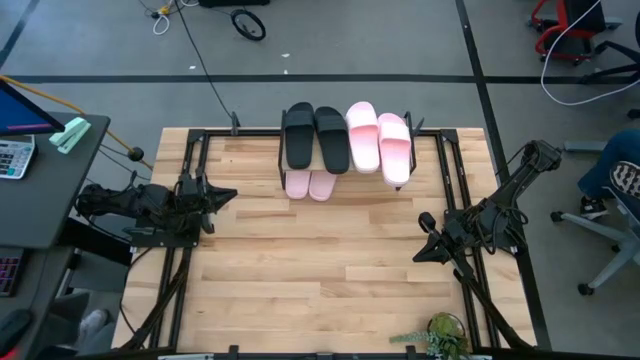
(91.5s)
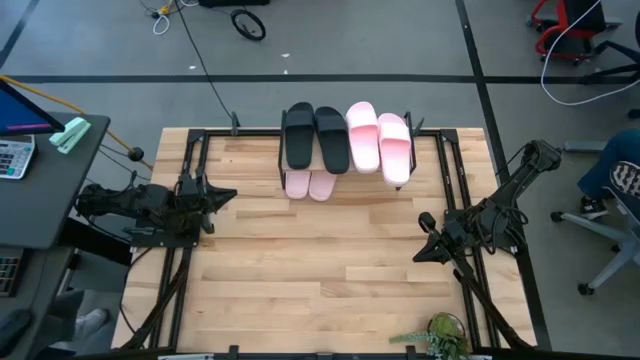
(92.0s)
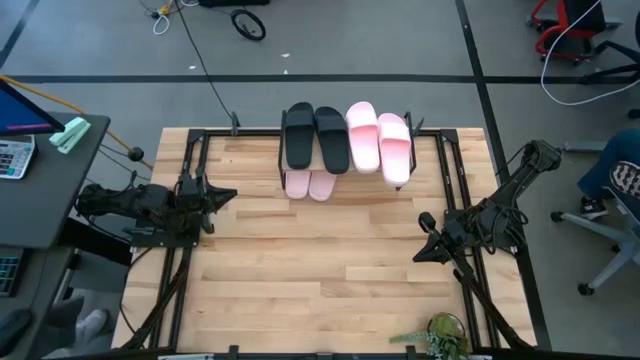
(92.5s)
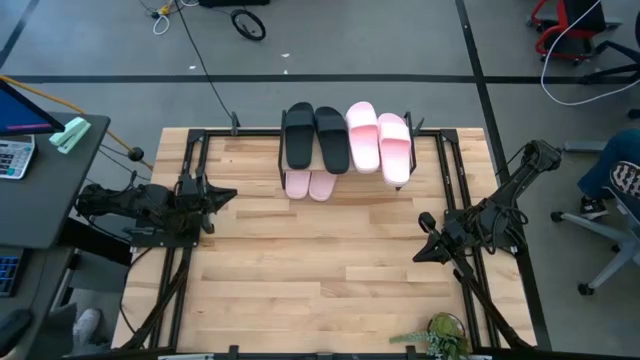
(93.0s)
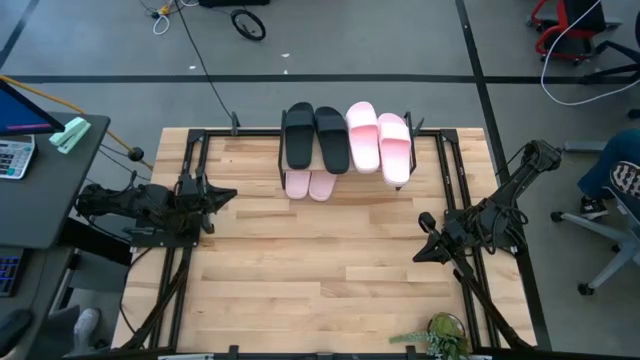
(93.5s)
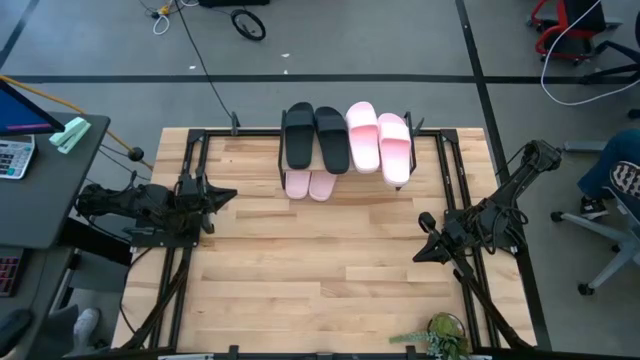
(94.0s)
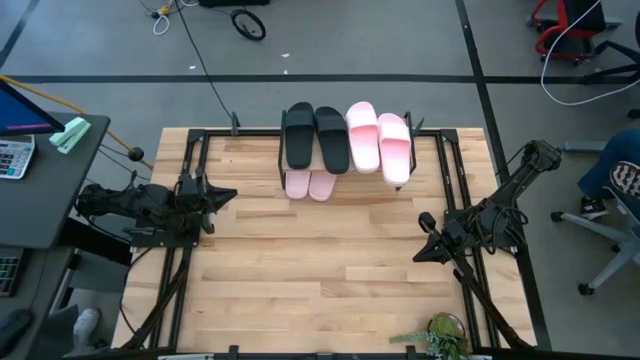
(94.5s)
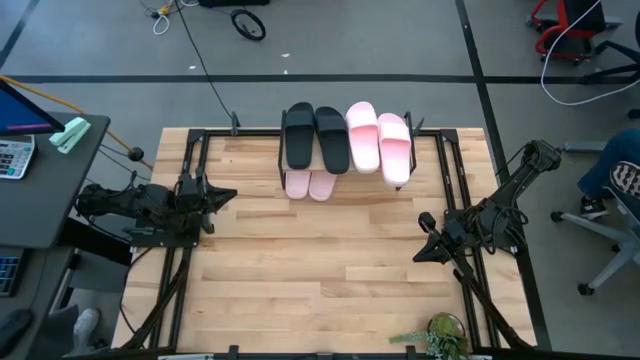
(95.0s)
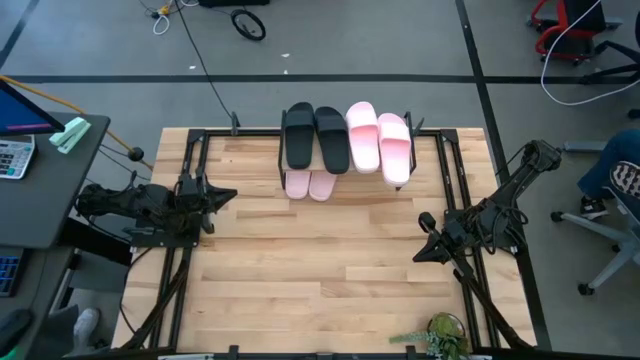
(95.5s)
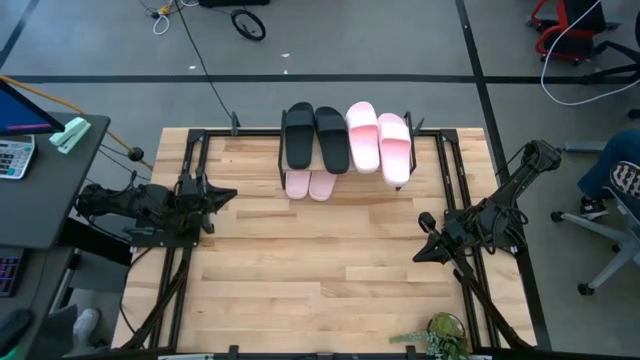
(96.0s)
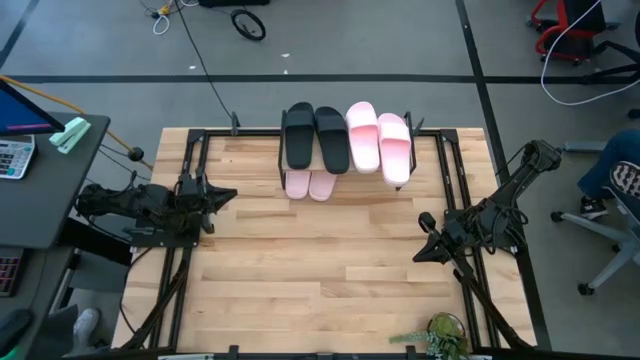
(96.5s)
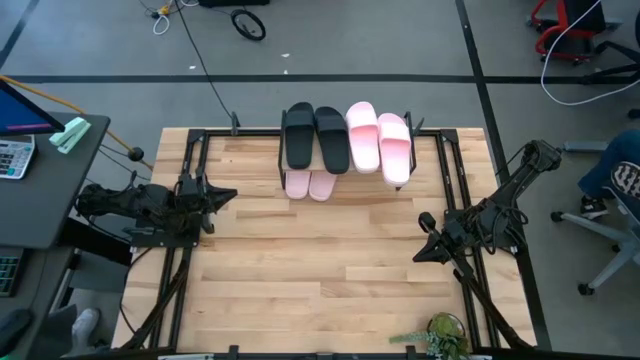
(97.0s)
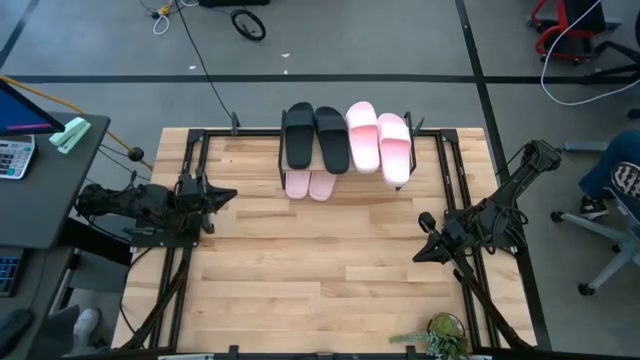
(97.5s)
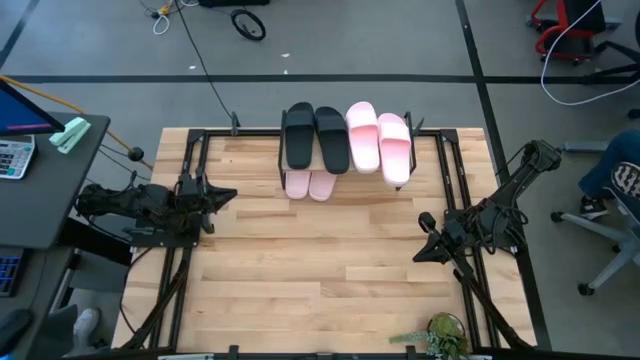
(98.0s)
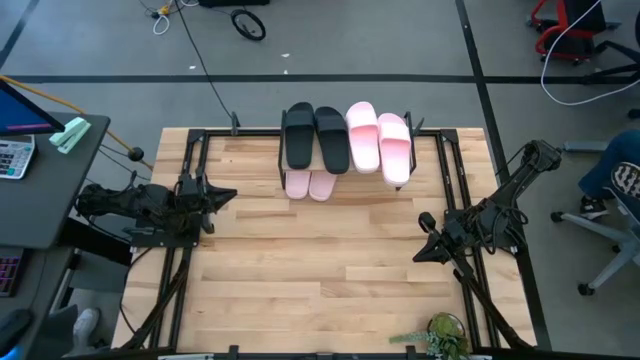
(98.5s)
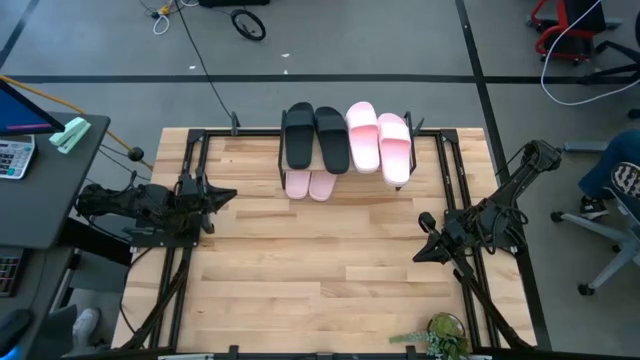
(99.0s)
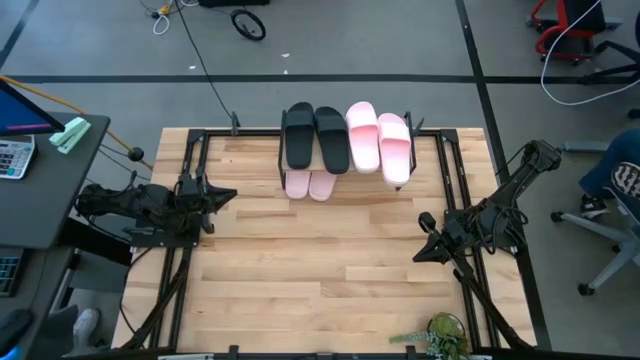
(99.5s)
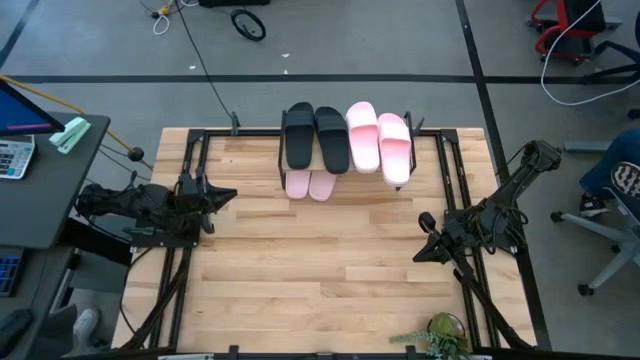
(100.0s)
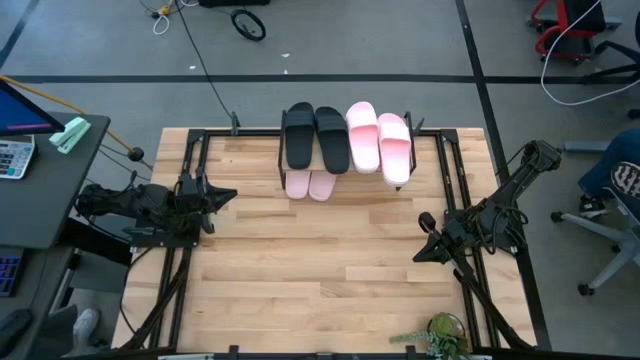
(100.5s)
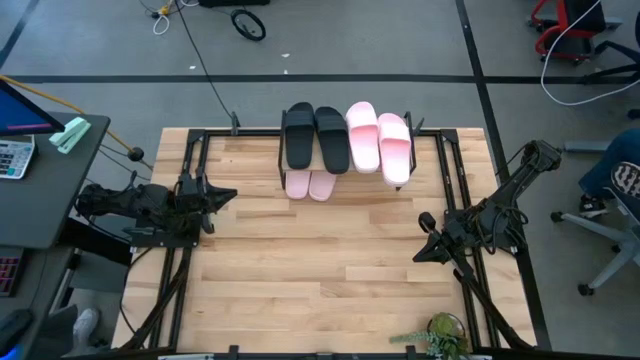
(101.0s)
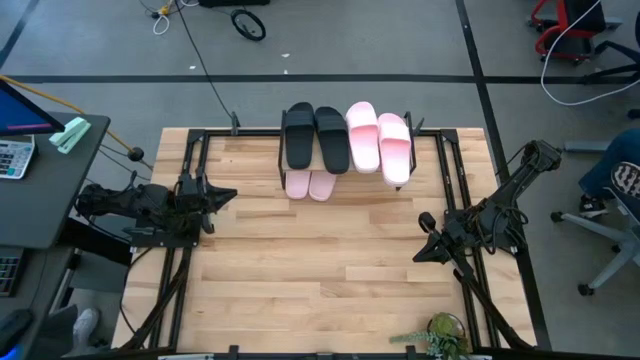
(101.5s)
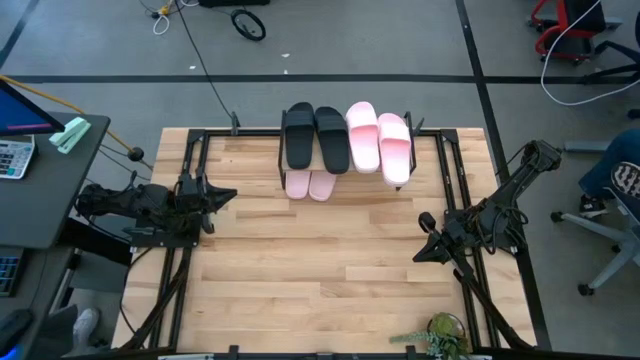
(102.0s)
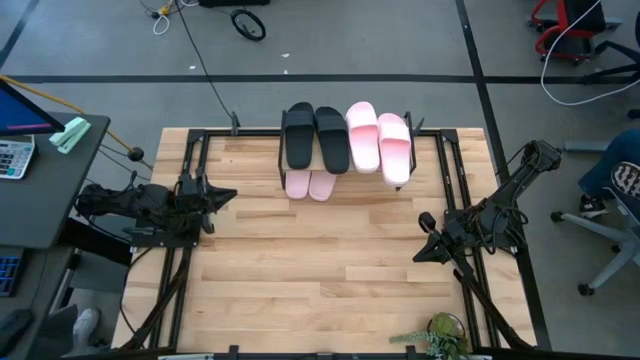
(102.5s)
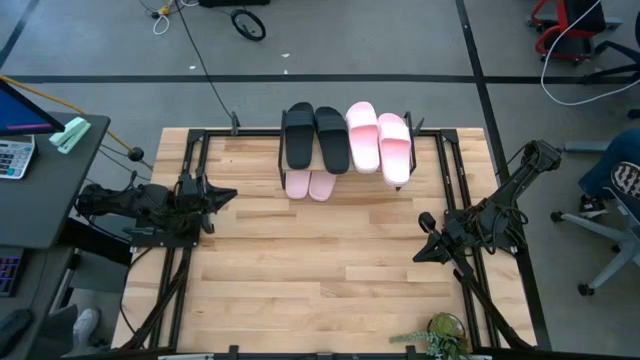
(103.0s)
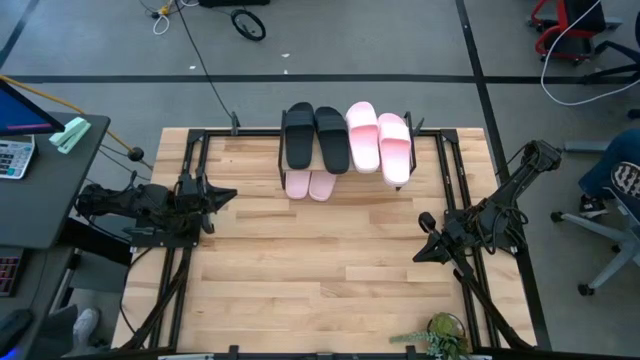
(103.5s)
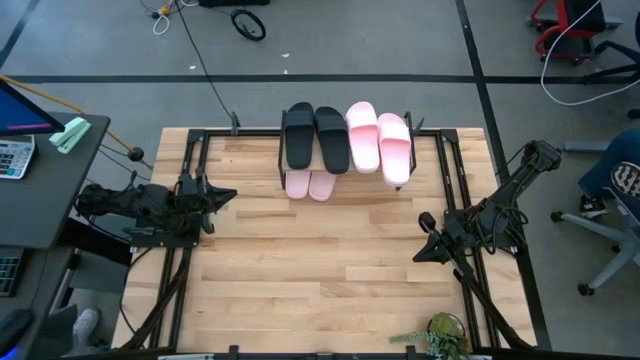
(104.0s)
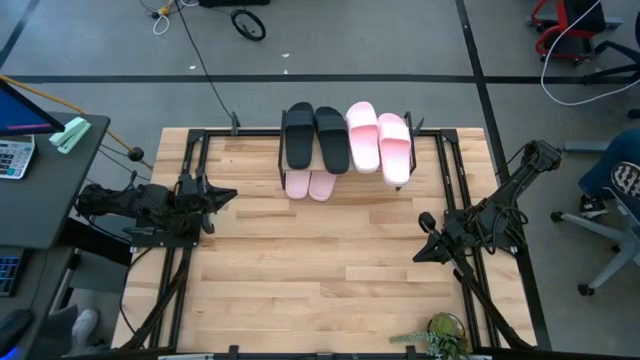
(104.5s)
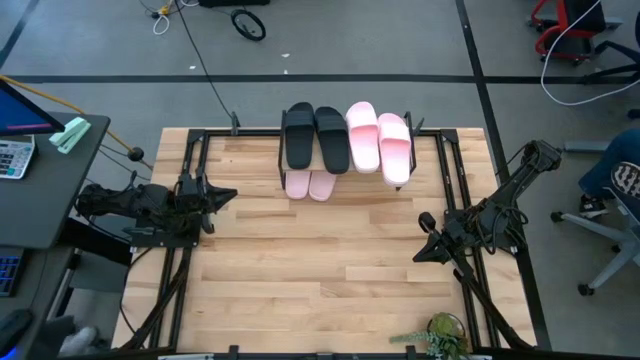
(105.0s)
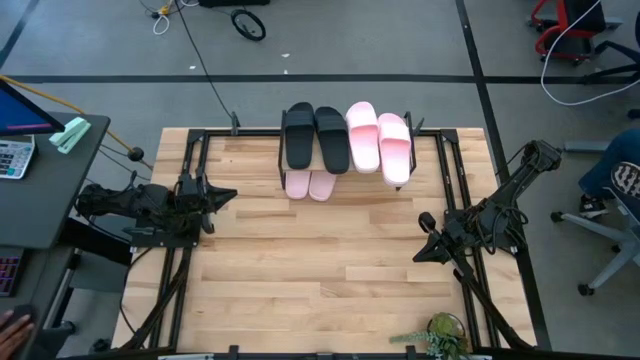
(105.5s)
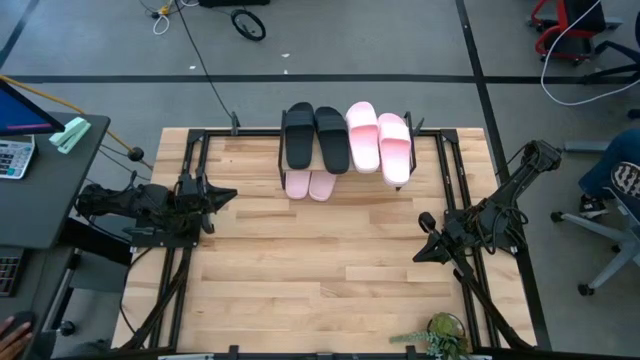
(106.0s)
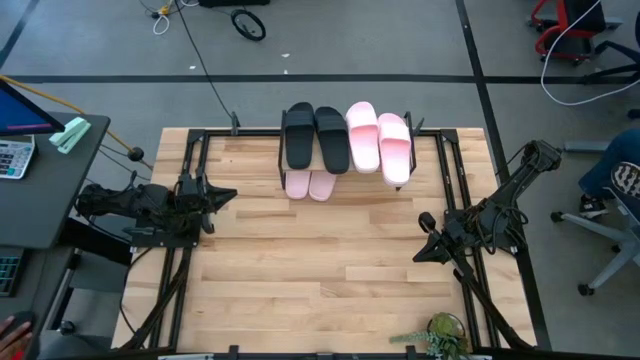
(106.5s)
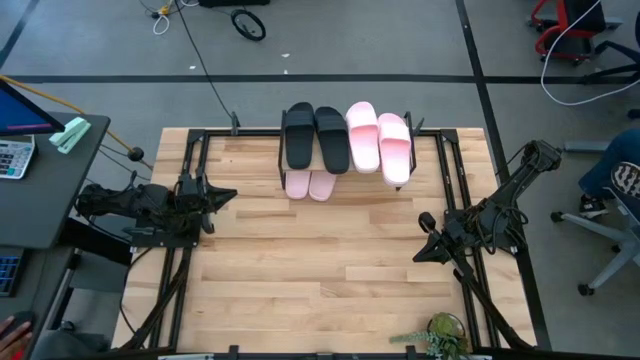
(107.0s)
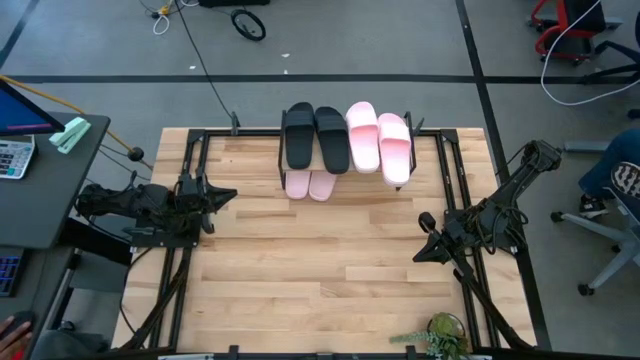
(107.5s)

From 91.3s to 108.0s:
Task: Pick and place slides into the shelf
Return to Home Position

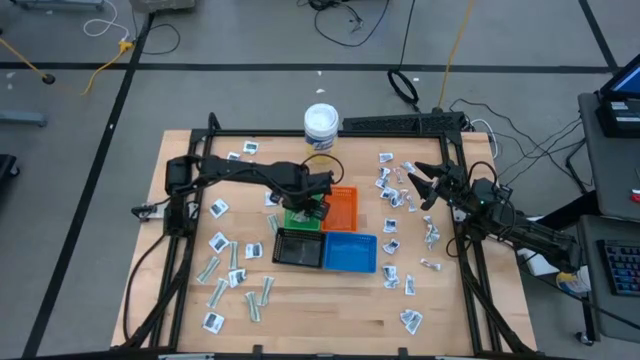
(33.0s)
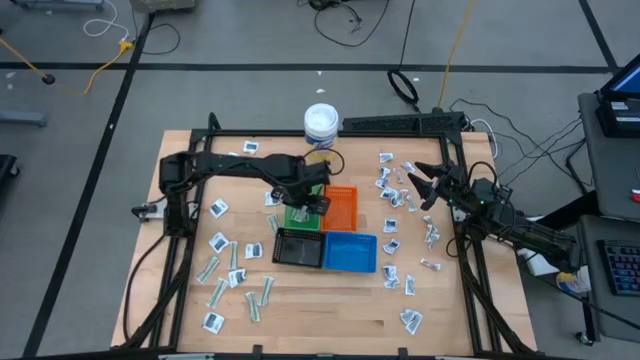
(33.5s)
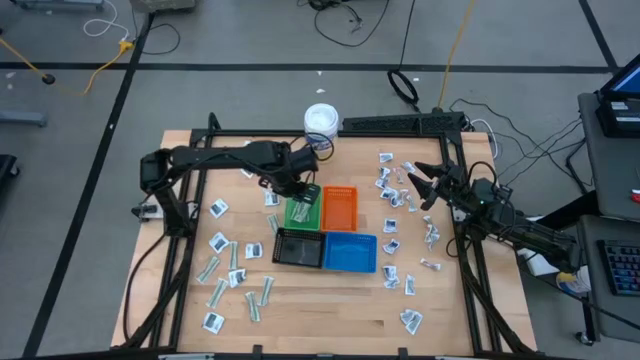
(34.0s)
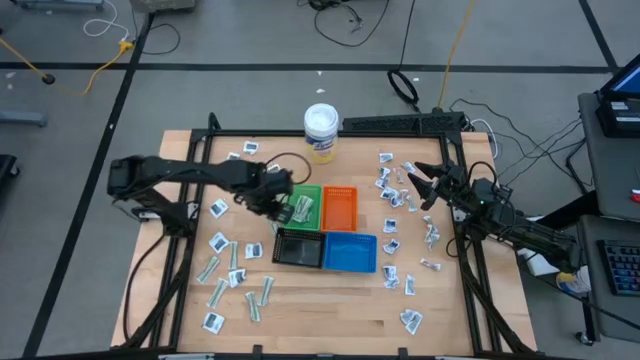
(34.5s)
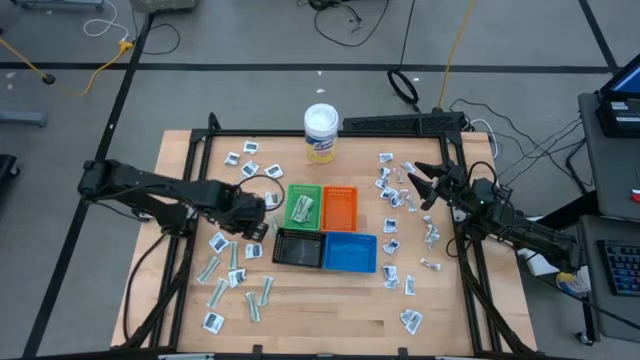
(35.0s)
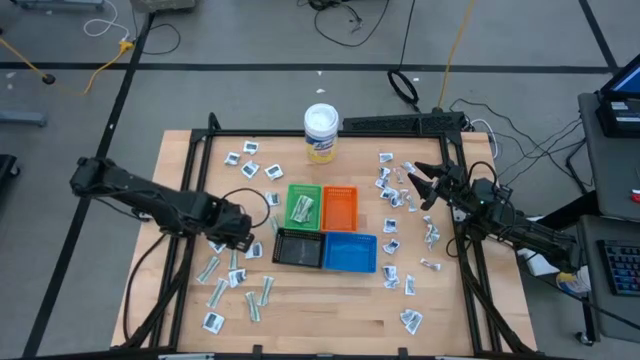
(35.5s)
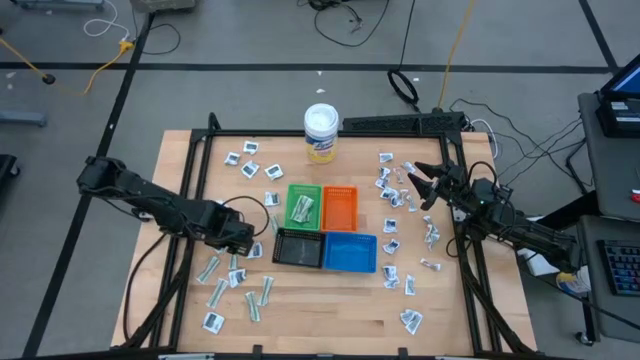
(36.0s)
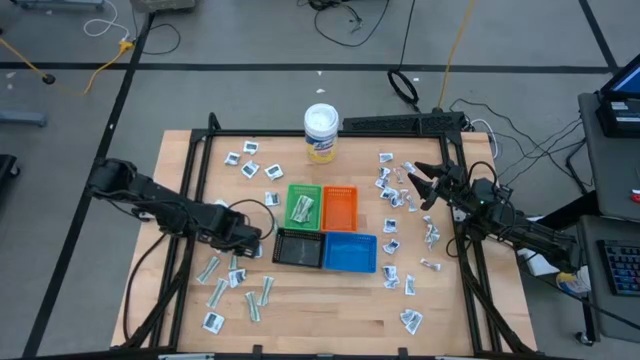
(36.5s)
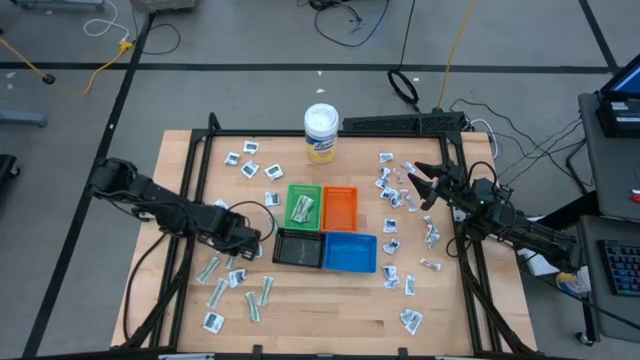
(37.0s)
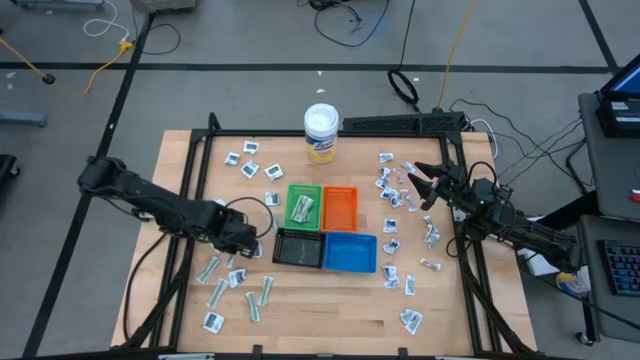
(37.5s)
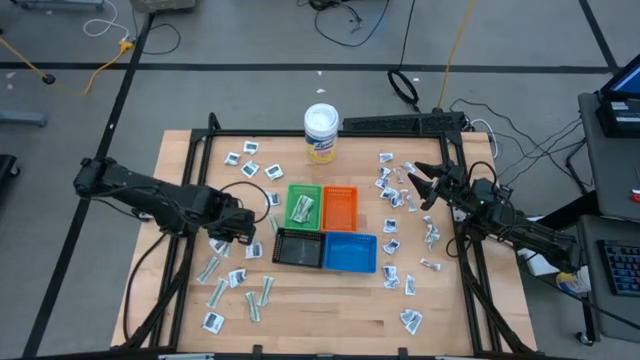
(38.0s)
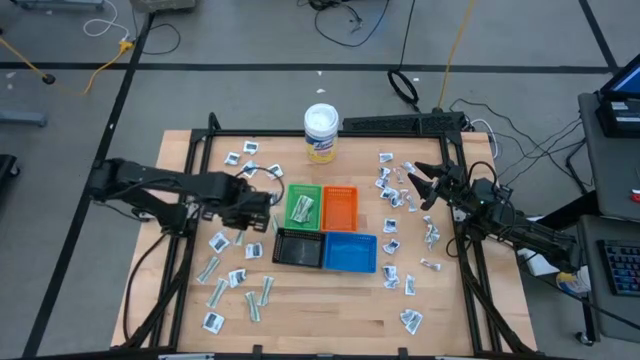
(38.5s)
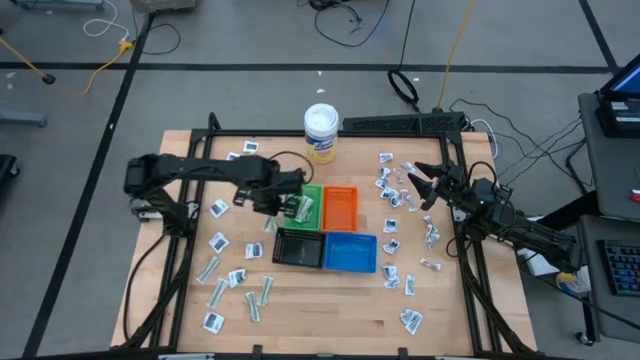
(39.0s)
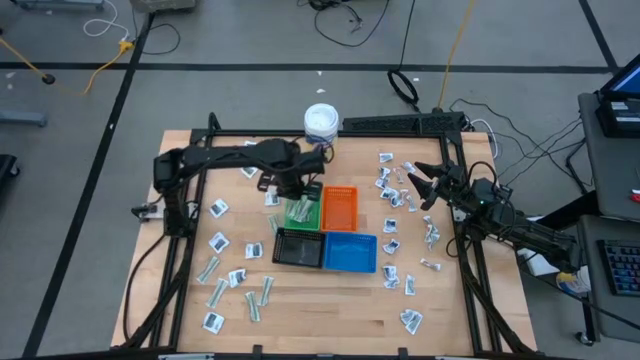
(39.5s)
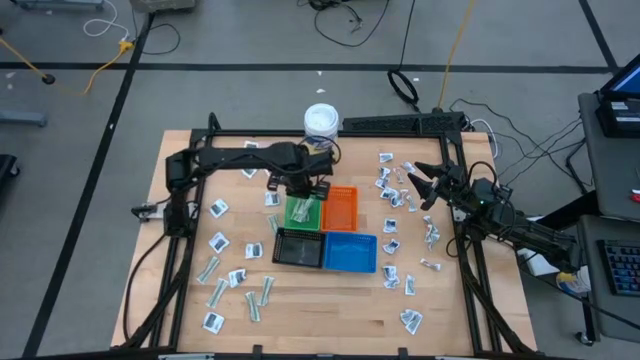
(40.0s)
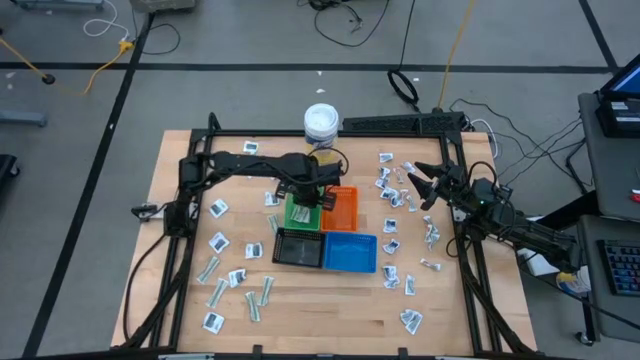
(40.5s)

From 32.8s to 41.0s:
Task: Pick & Place First Aid Supplies
Put the bandage pack into the green bin
